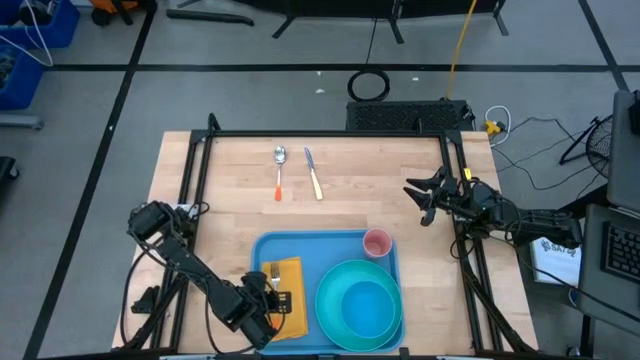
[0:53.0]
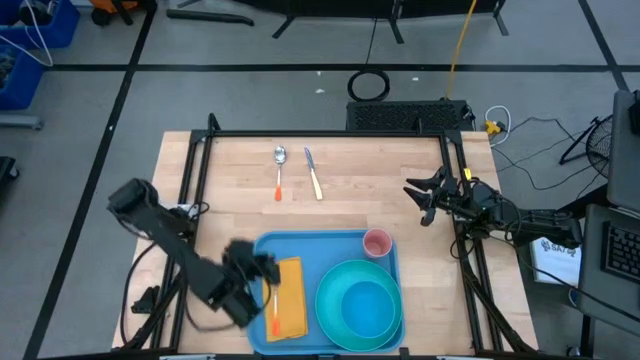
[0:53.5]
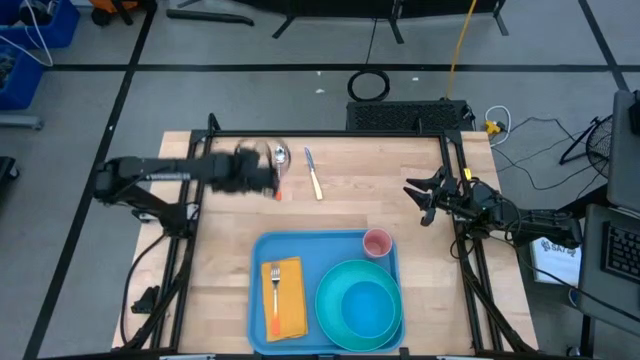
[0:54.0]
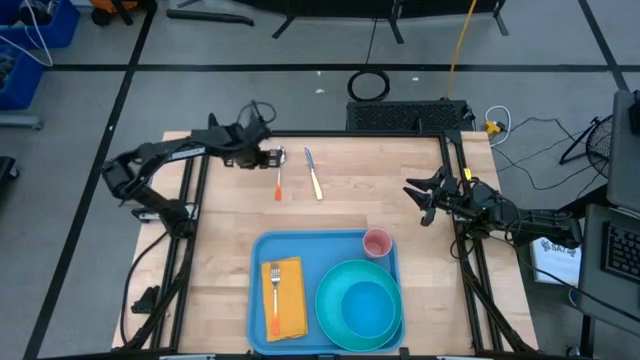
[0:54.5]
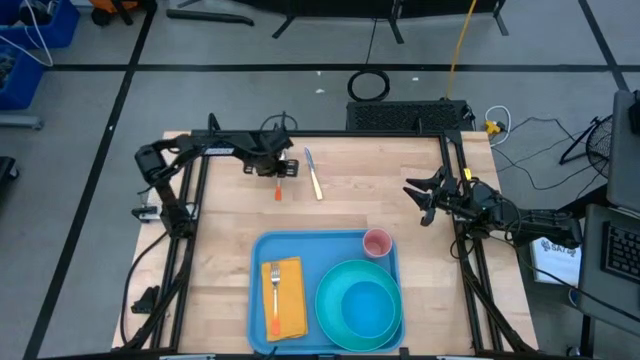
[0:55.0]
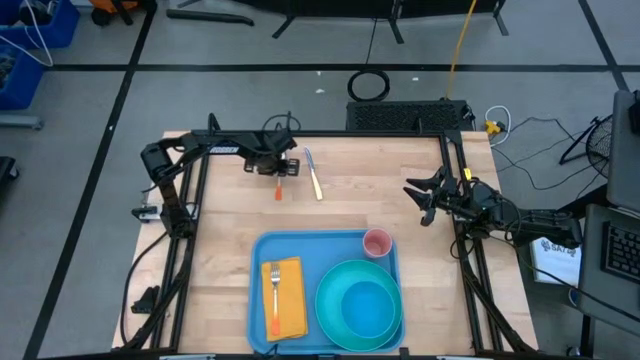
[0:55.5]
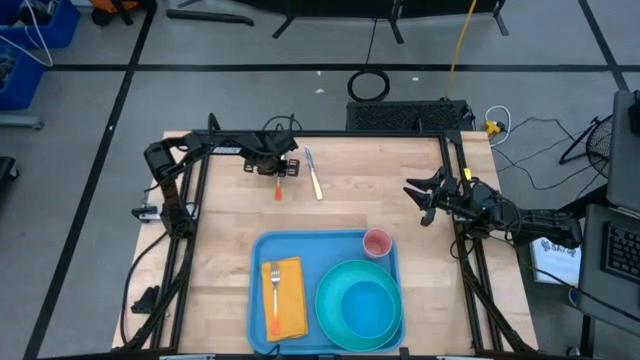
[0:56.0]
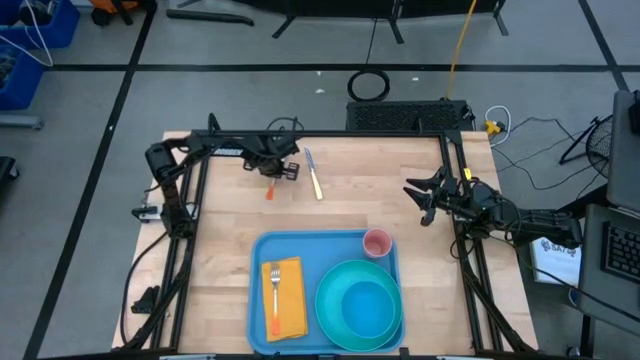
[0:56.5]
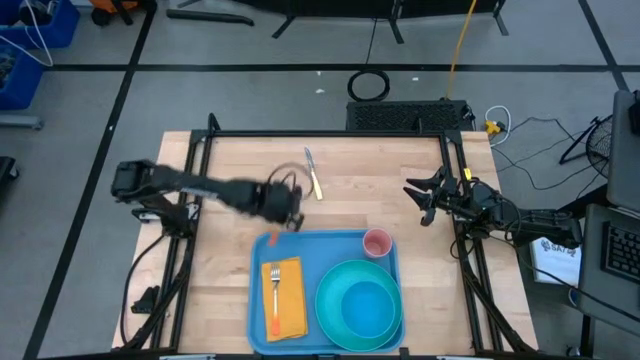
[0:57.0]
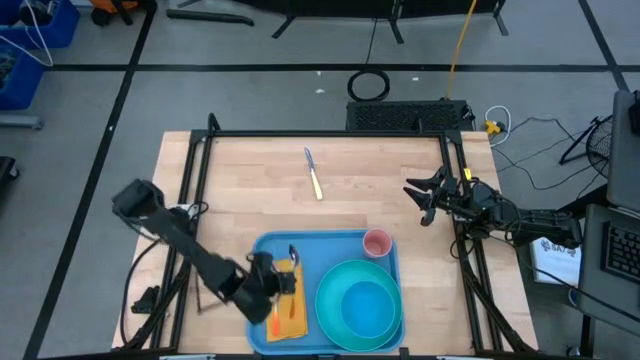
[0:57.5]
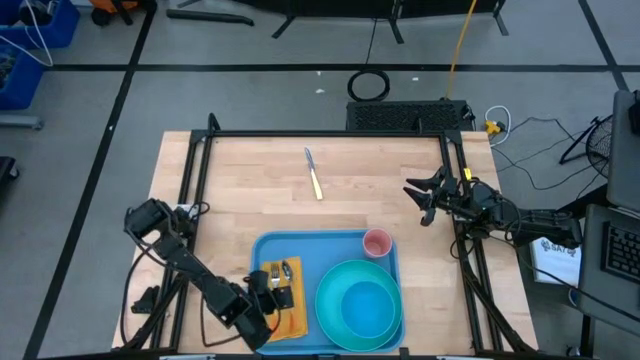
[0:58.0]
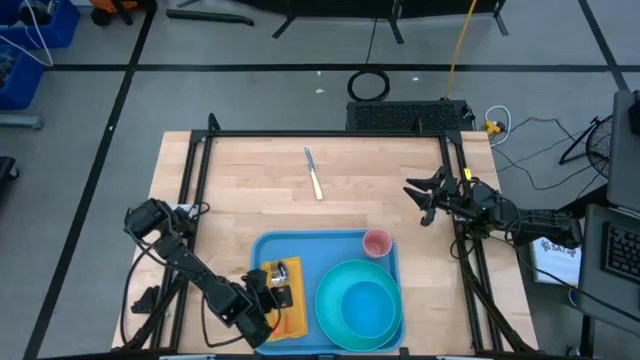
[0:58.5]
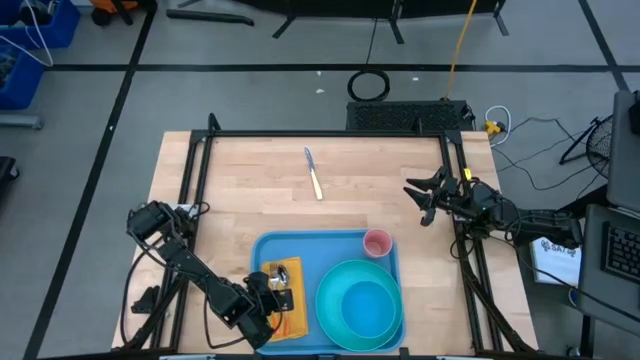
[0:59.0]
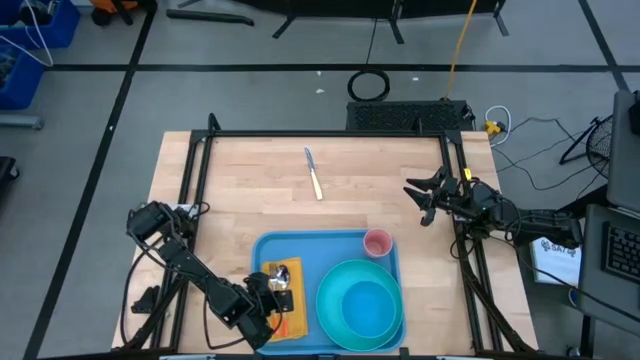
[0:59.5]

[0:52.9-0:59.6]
Task: Set up tray
Put the spoon on the blue serving tray

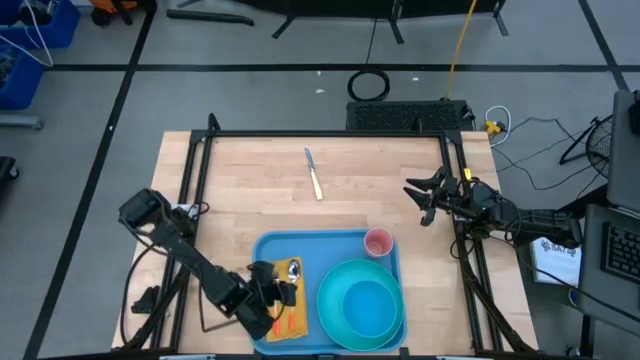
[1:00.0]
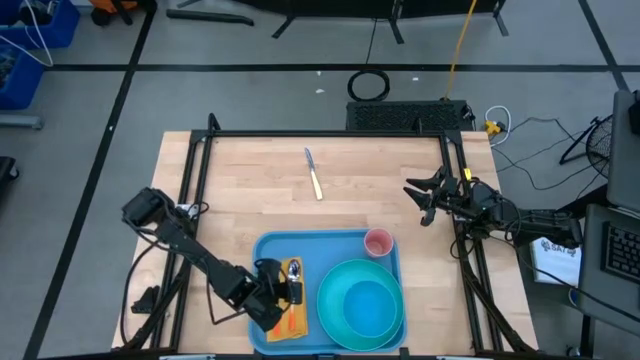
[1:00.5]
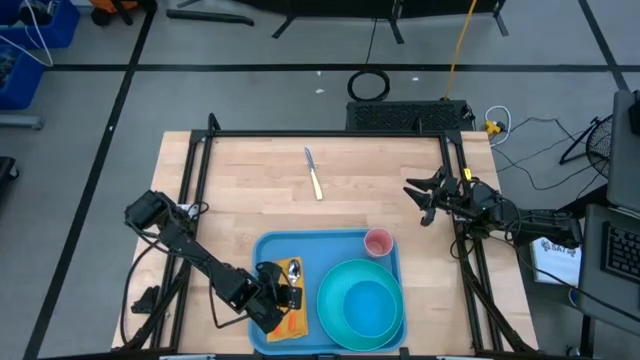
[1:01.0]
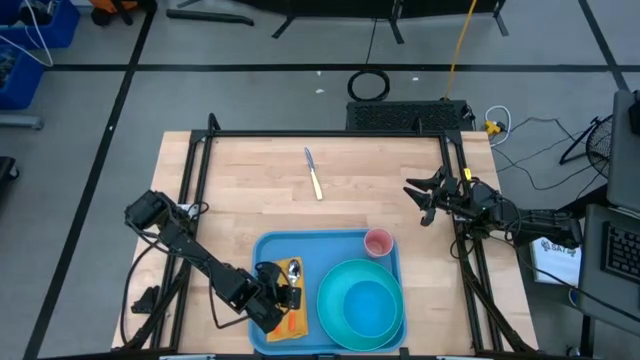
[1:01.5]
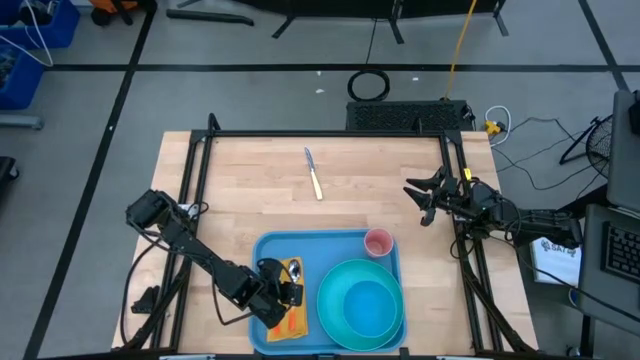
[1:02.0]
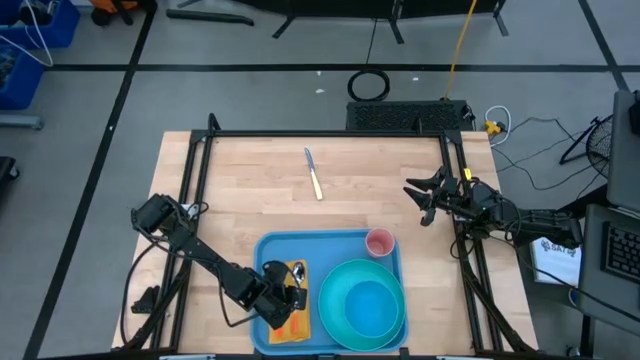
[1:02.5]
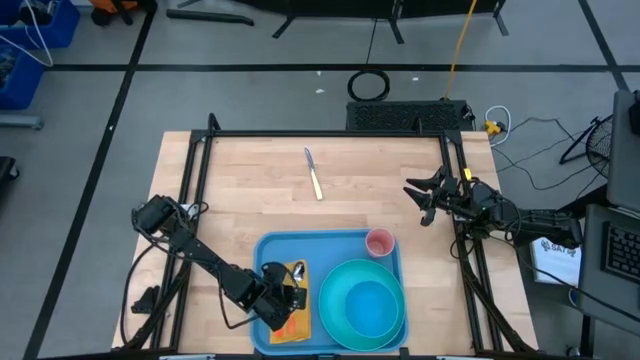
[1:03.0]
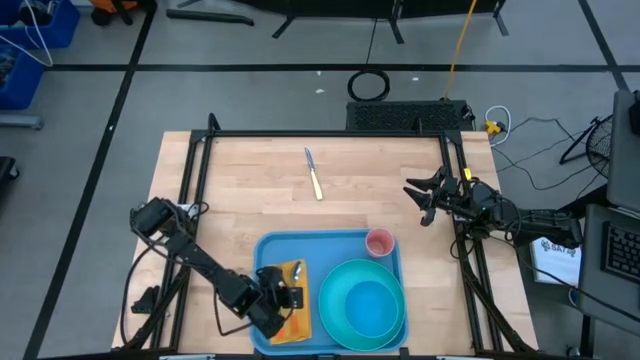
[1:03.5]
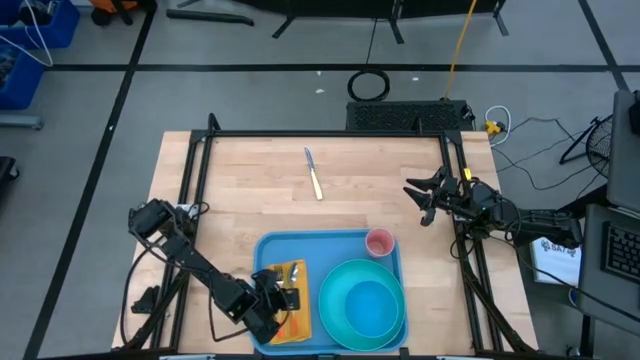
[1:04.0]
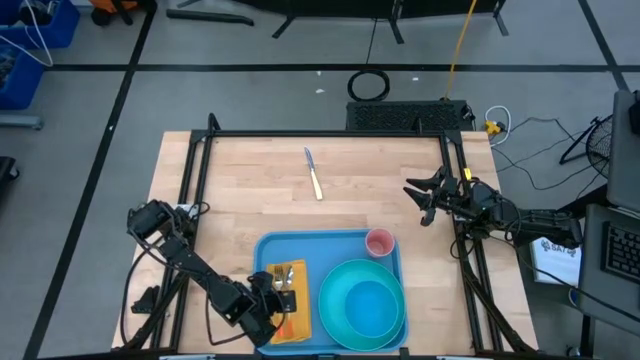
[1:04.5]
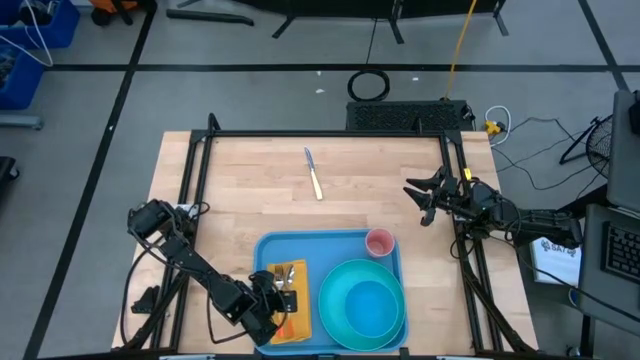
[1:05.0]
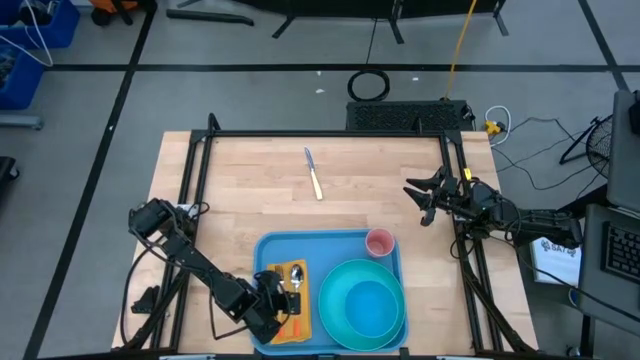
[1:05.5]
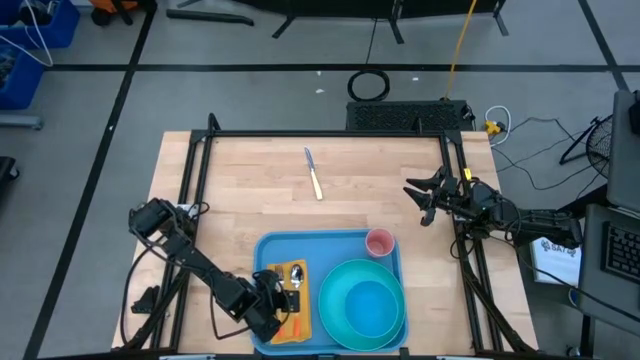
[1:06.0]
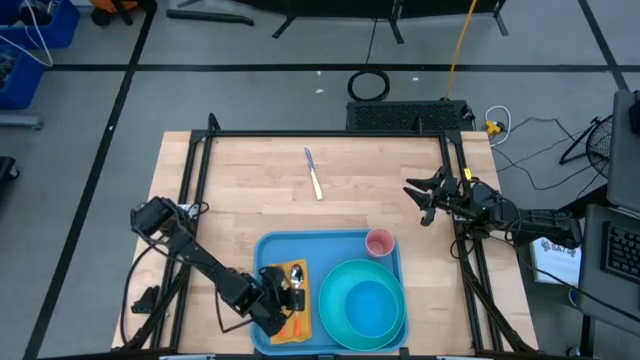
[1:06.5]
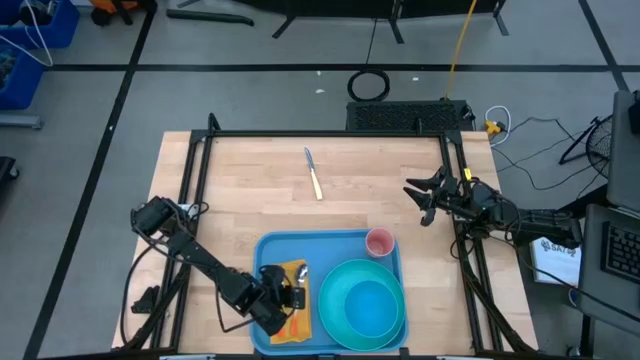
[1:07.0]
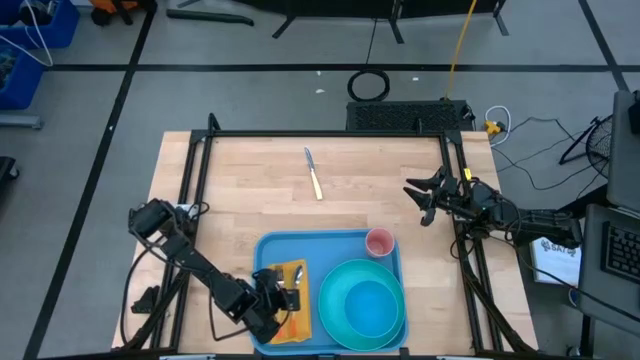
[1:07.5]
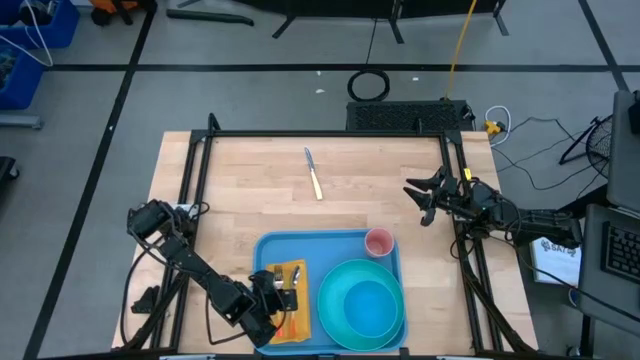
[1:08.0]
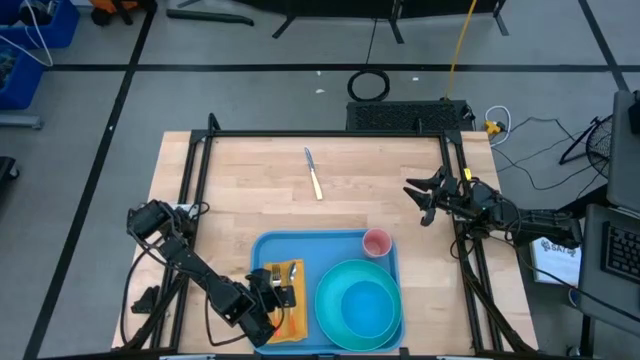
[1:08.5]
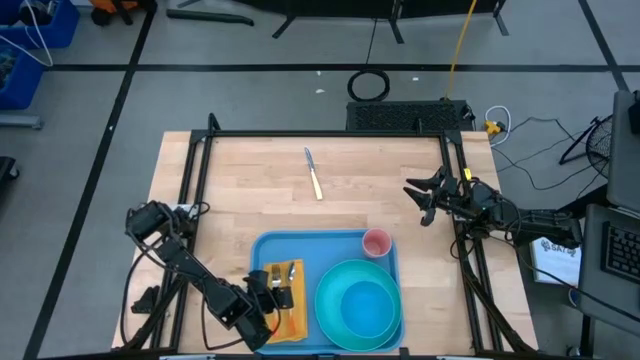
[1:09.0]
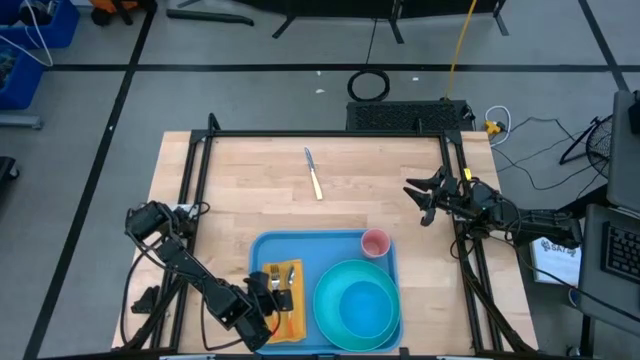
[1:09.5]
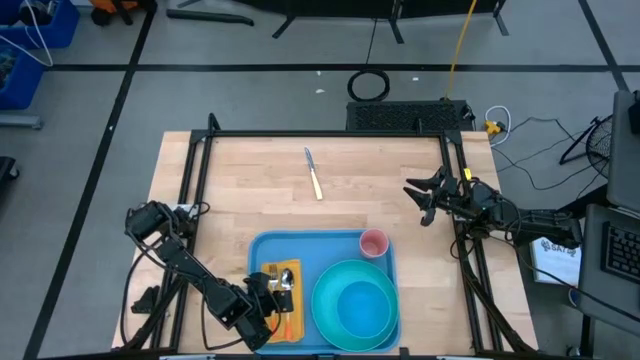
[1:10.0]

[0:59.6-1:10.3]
Adjust the spoon on the blue serving tray

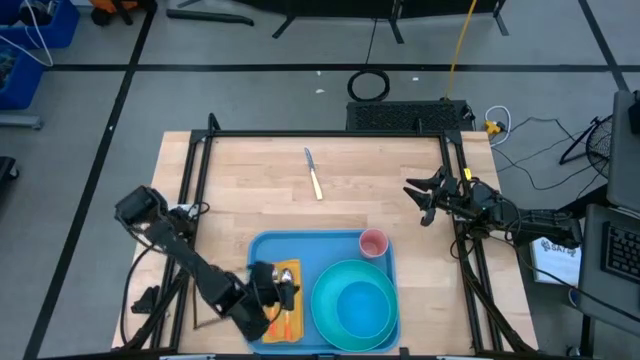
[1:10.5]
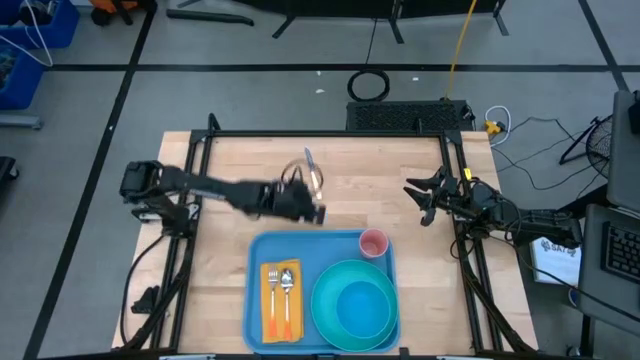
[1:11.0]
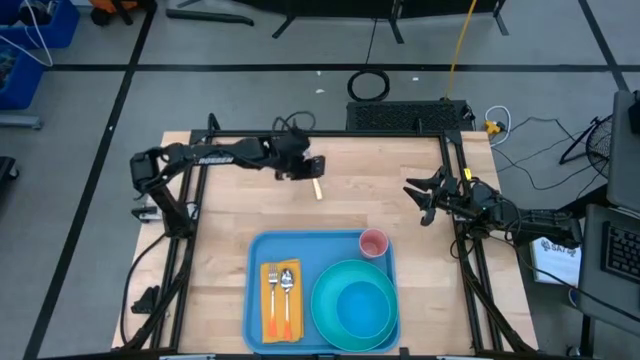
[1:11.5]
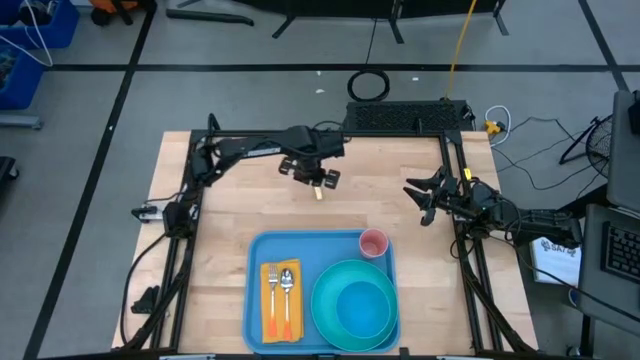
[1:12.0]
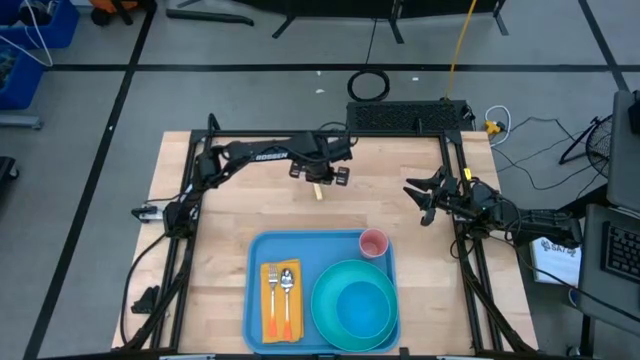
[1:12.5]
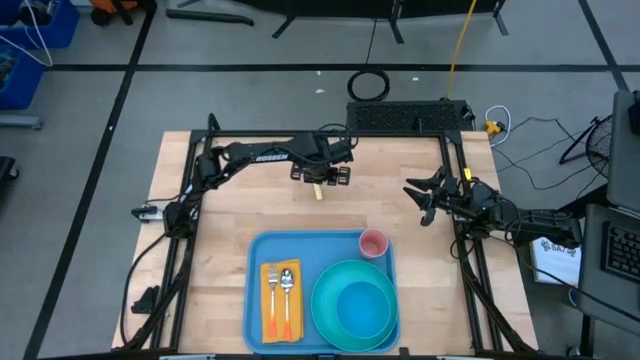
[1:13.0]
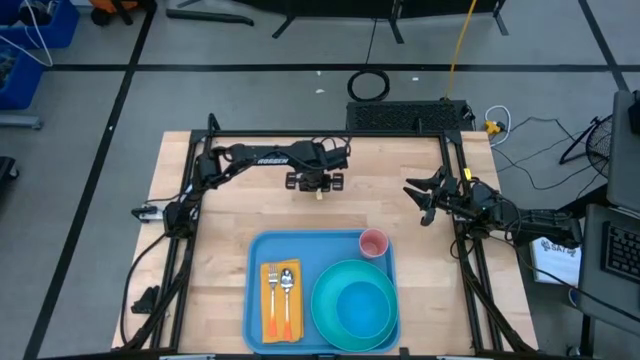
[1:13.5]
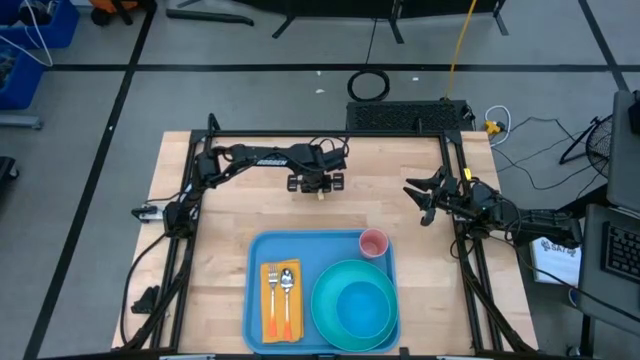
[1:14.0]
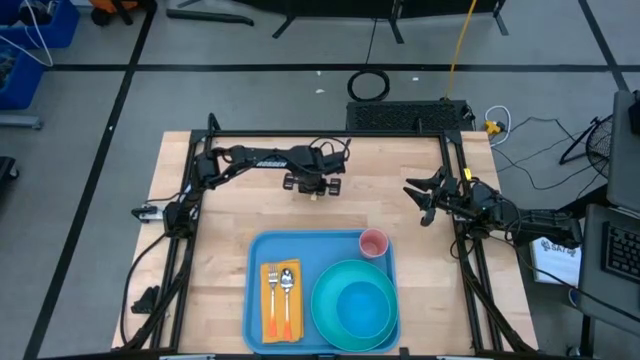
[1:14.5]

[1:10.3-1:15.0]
Put the table knife on the blue serving tray
